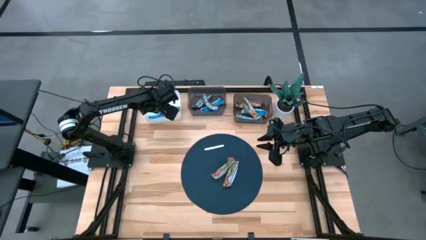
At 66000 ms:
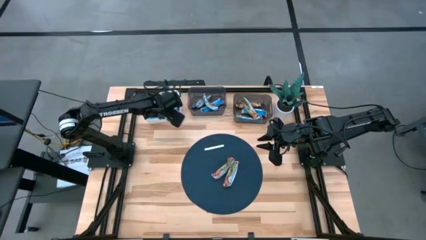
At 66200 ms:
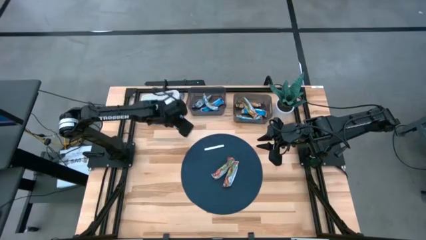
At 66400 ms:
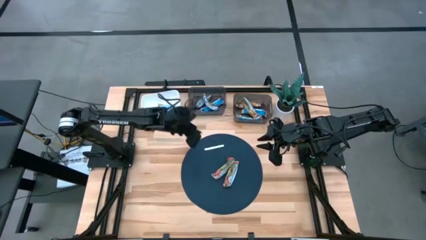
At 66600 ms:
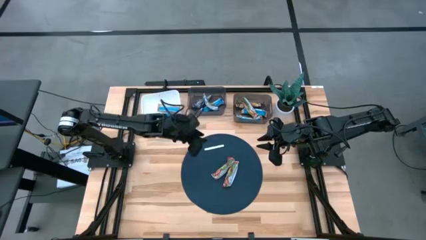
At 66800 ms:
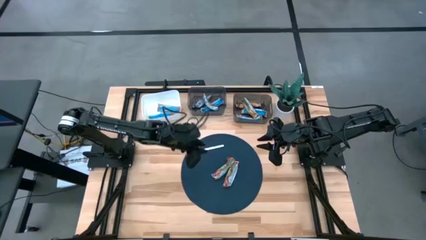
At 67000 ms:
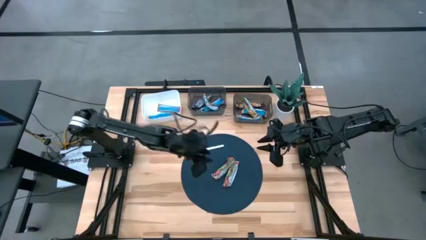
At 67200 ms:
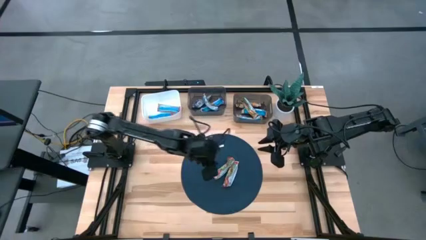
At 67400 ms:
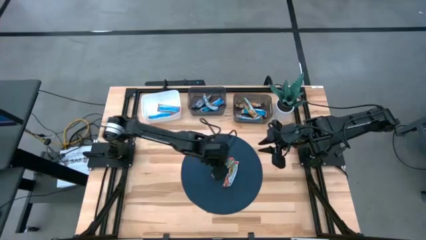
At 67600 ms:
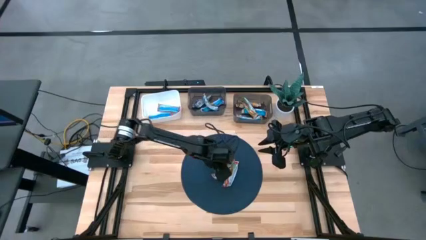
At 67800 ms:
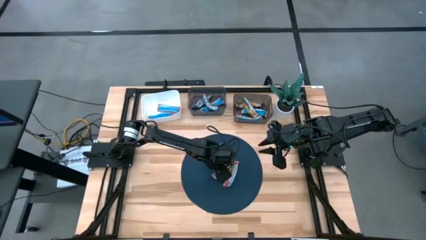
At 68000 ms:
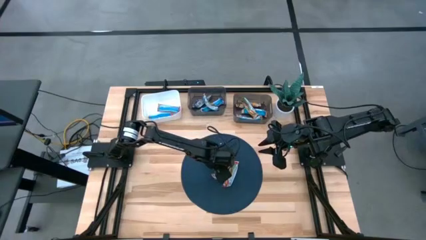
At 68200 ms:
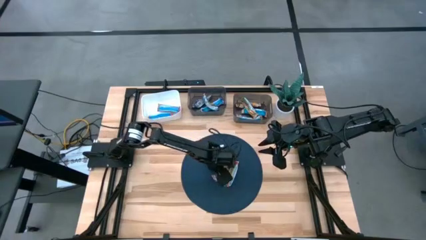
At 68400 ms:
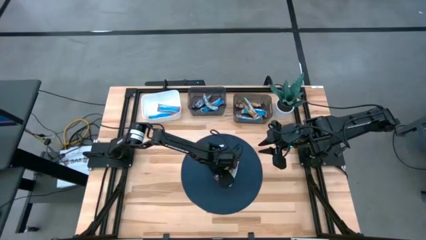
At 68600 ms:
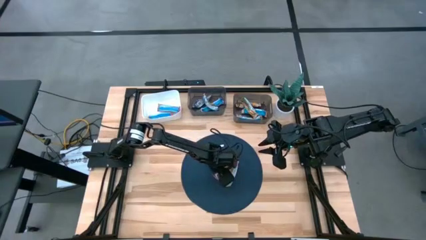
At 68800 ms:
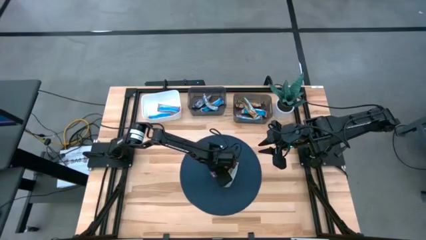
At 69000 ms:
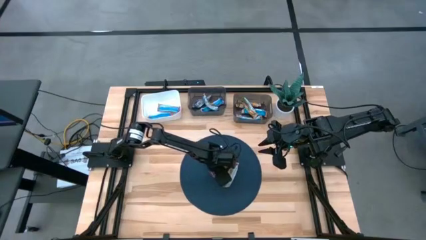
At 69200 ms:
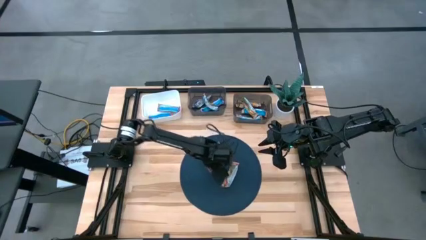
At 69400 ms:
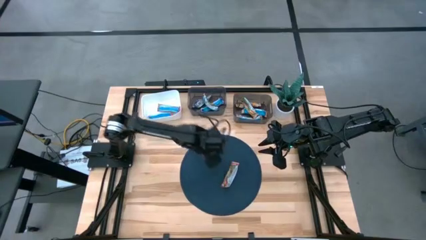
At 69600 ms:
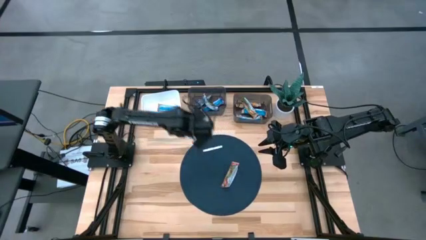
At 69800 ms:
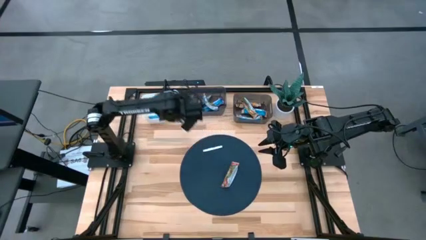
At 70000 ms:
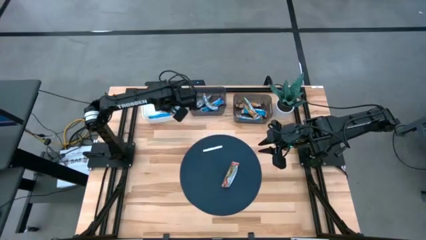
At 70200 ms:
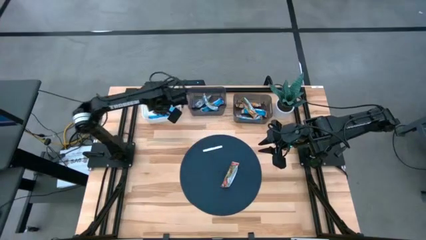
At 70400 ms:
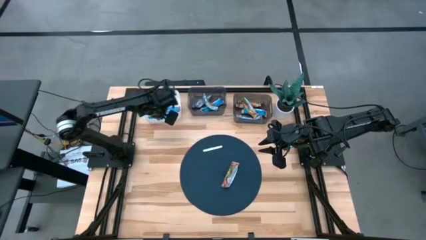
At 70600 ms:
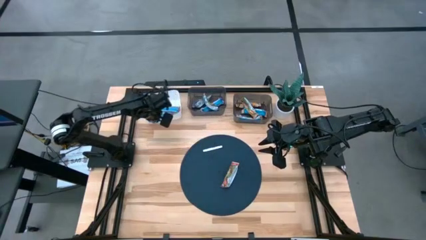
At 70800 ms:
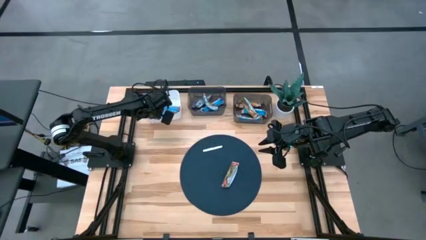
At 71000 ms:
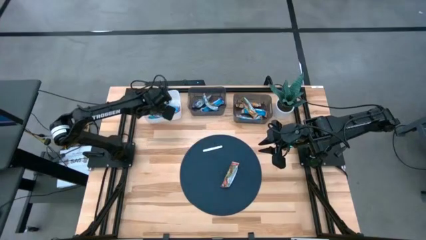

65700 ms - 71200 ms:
Task: Pick and place Granola Bars by type
Put the red granola bar into the white bin

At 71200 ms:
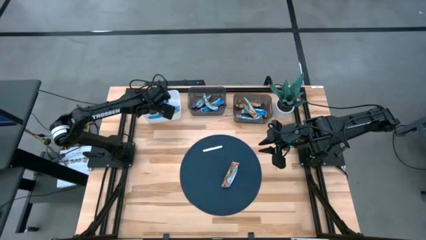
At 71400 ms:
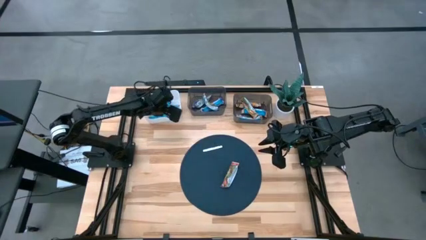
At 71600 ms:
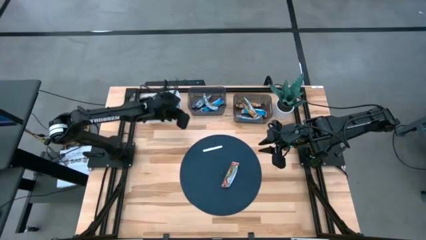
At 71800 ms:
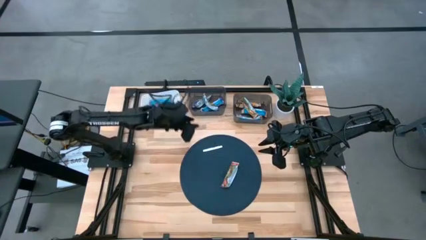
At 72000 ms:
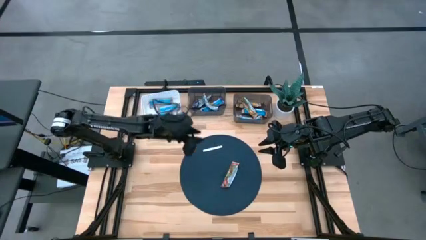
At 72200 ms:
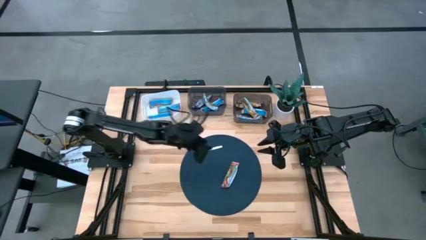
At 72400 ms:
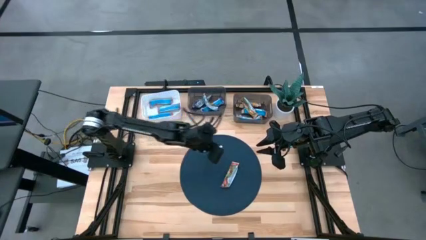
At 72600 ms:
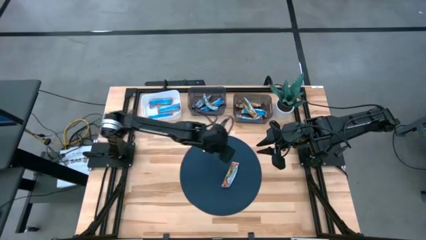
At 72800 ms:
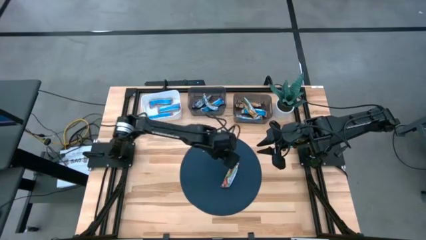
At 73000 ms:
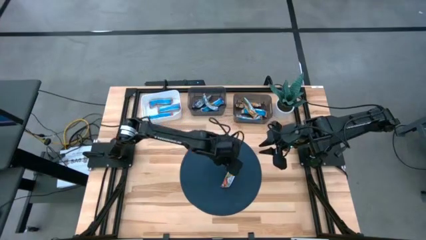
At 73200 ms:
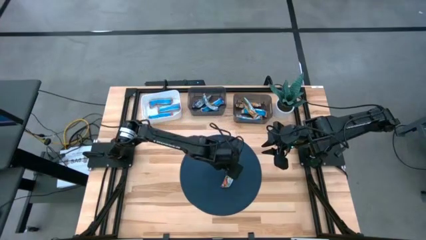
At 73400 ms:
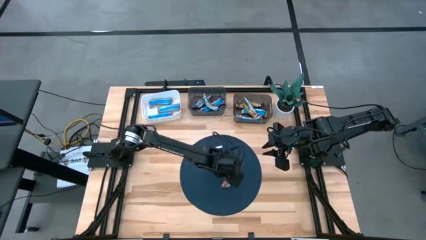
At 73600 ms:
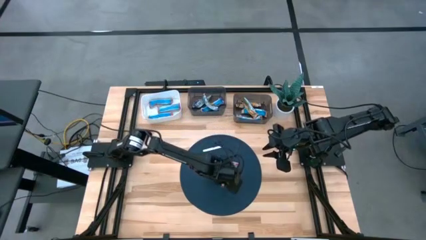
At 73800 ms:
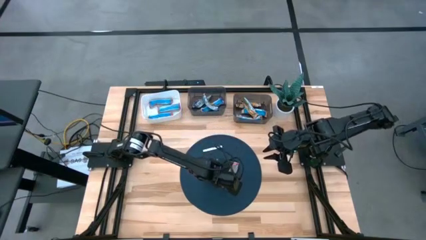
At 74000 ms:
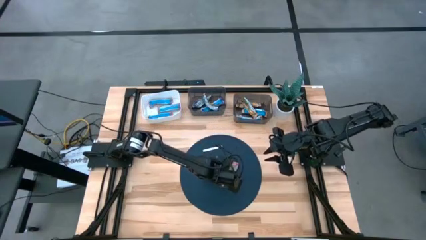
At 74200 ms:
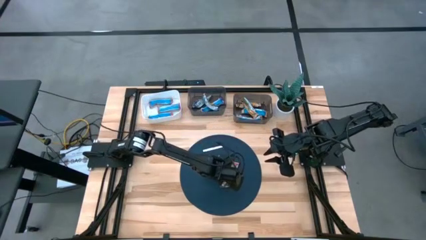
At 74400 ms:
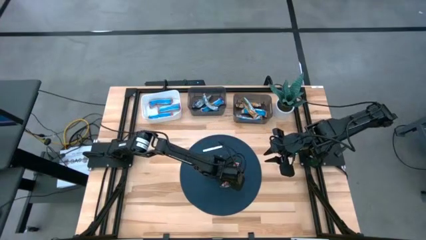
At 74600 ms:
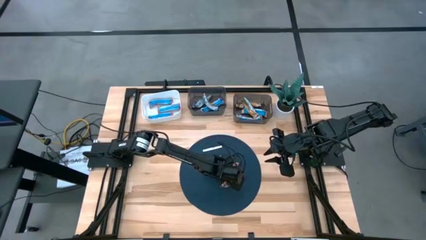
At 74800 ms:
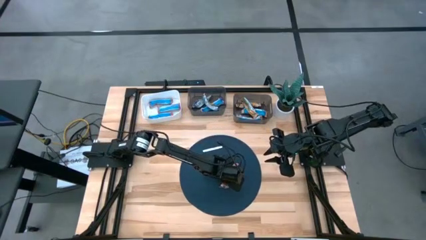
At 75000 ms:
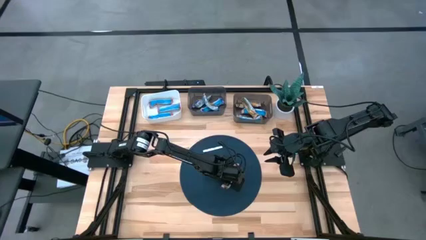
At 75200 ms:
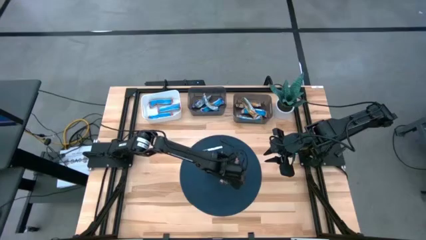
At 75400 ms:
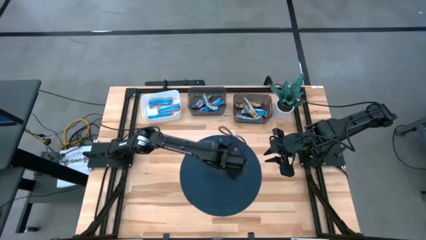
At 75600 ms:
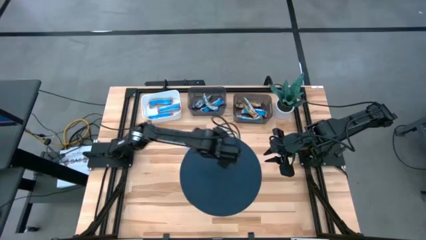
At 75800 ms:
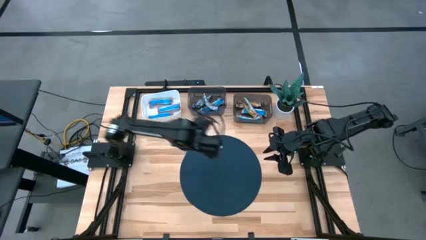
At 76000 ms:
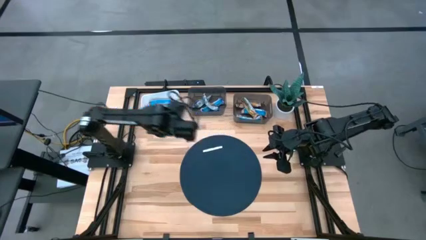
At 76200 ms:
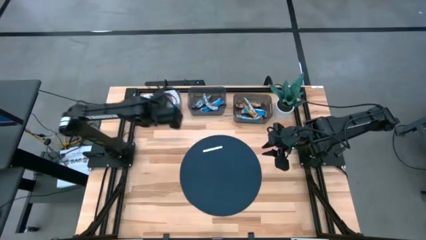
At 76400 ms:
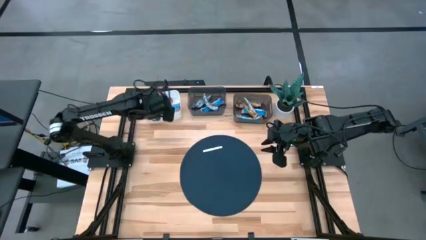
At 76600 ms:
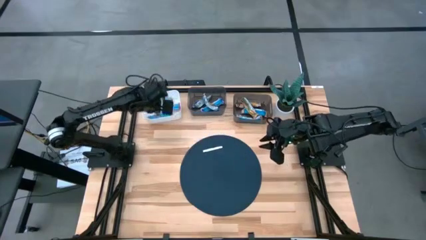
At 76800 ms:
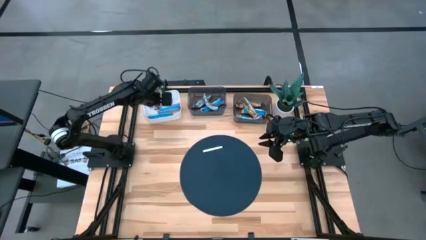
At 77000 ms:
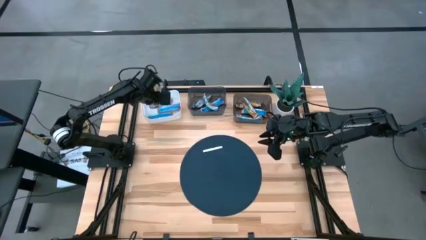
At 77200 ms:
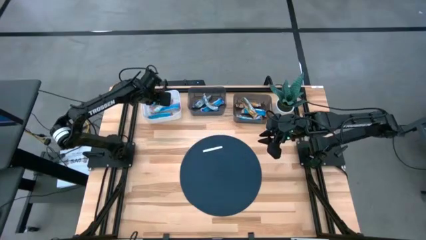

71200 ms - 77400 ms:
Put the red granola bar into the white bin

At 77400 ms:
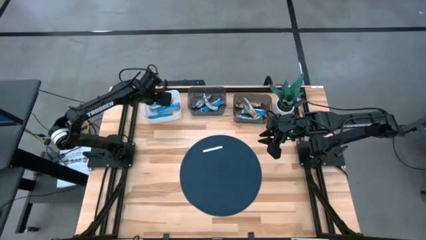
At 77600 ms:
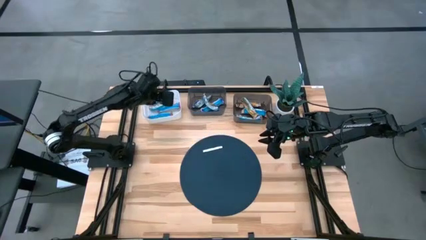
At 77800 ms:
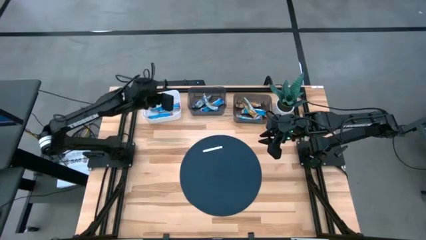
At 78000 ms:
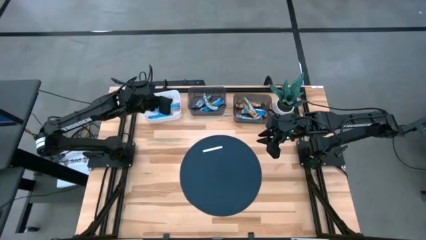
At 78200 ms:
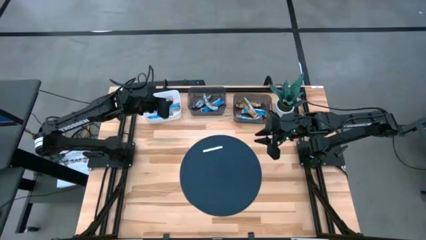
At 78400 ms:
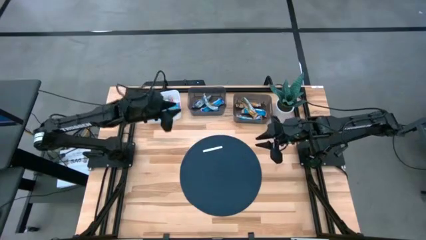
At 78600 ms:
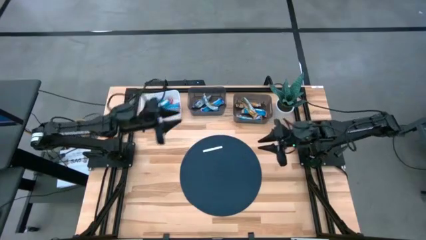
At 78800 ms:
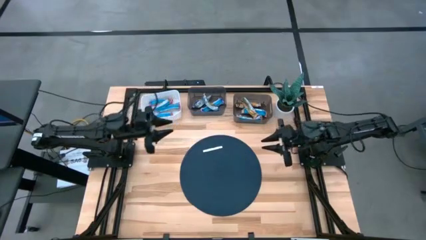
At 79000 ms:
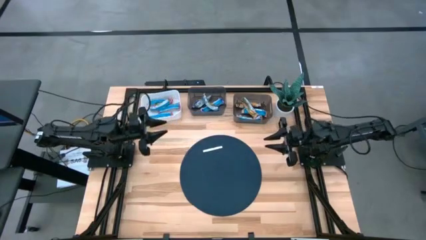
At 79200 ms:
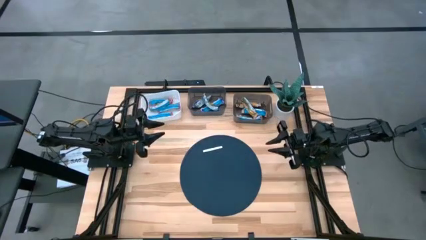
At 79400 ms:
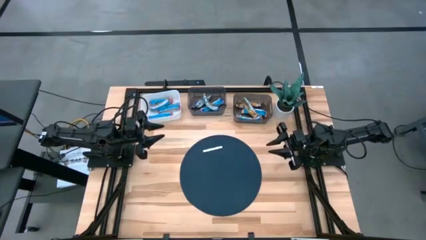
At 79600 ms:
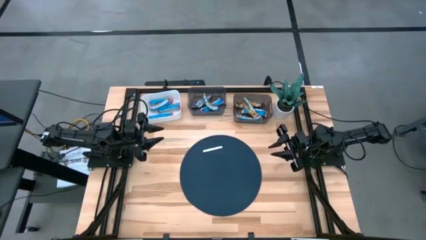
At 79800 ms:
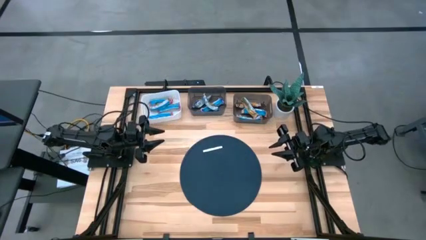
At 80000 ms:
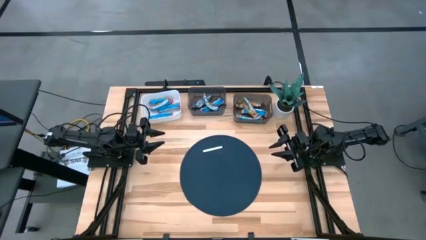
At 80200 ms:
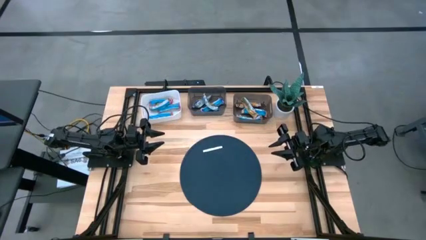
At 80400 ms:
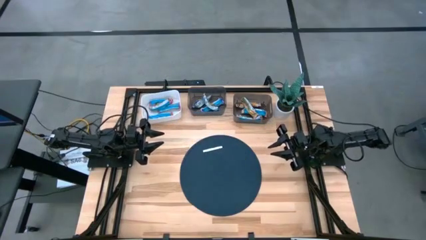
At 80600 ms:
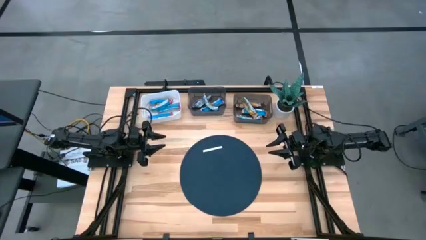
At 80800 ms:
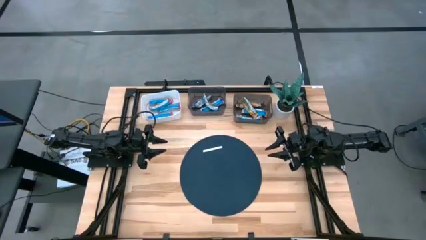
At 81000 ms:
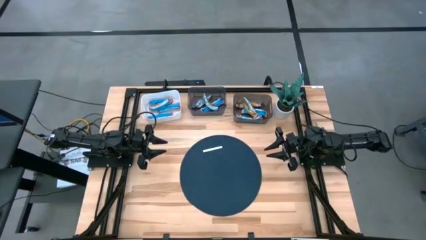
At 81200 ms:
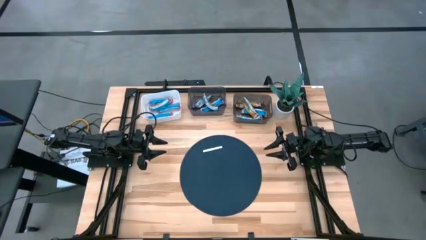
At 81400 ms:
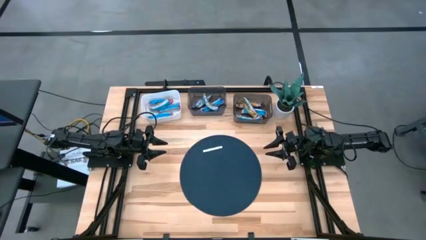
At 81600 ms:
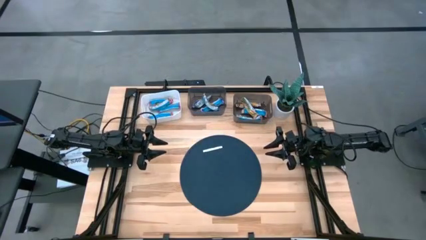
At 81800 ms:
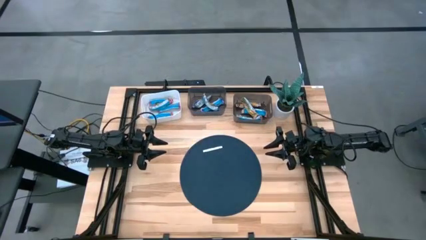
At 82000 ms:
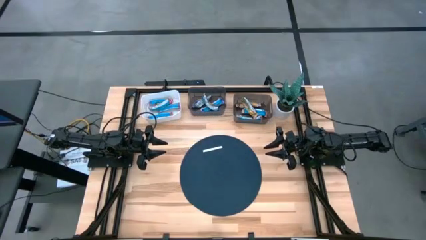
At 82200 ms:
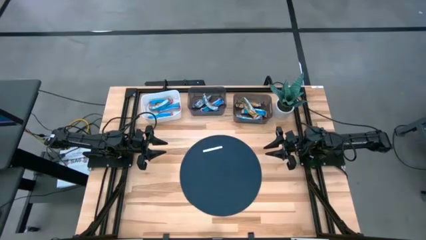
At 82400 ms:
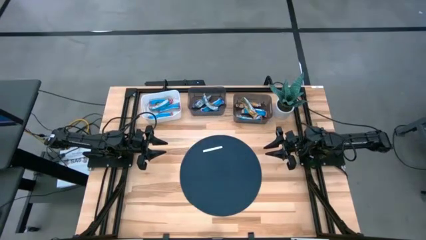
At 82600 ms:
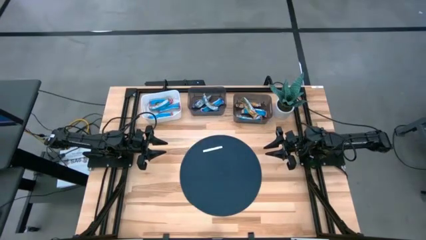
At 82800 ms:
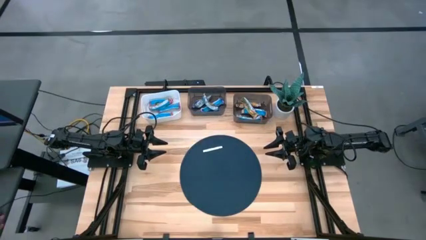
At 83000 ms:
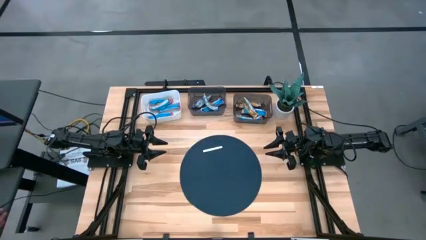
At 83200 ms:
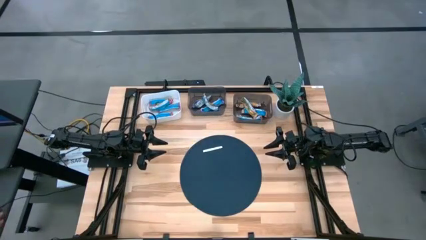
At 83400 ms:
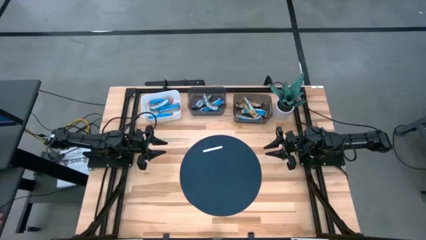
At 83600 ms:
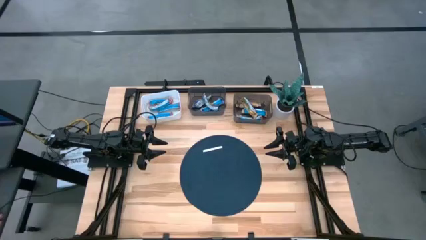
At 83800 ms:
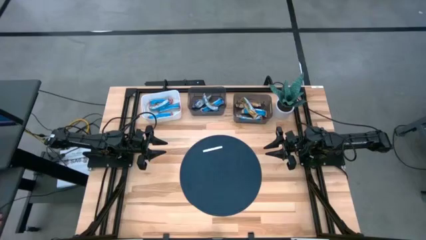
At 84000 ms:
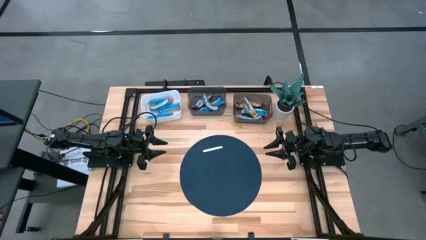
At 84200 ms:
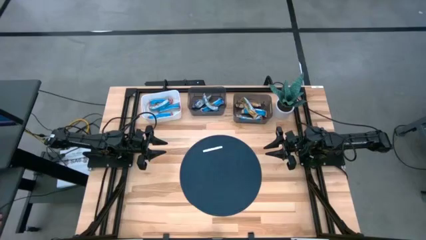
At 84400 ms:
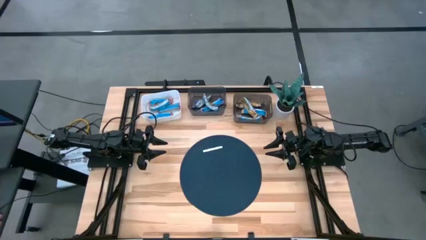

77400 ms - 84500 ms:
Return to Home Position
